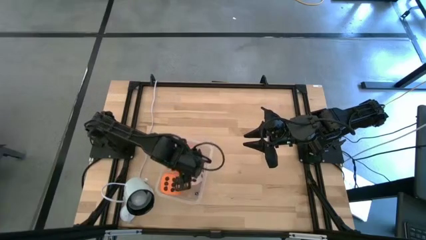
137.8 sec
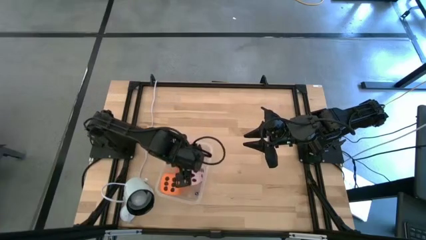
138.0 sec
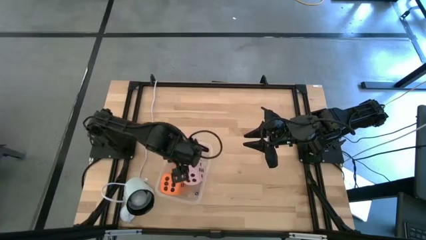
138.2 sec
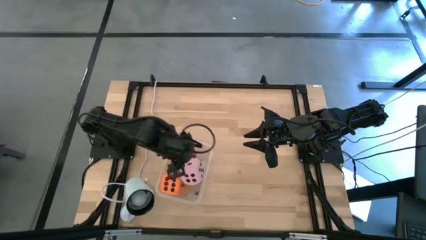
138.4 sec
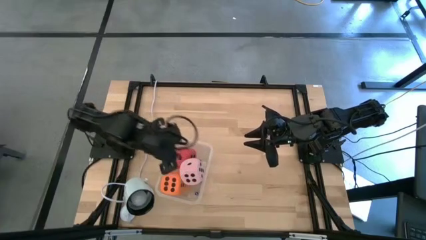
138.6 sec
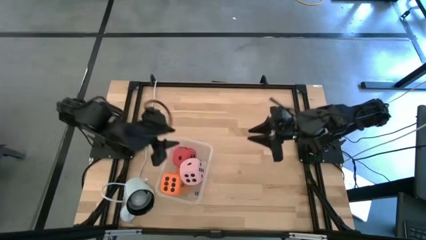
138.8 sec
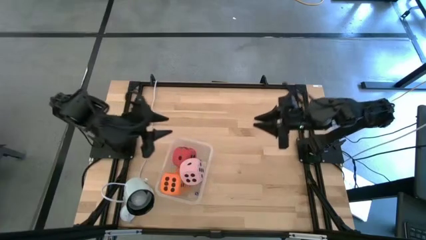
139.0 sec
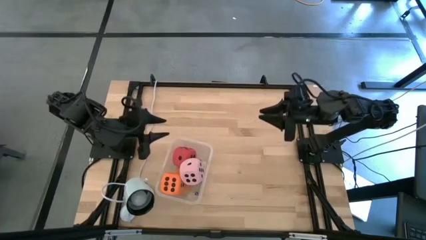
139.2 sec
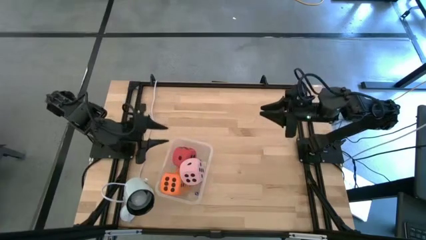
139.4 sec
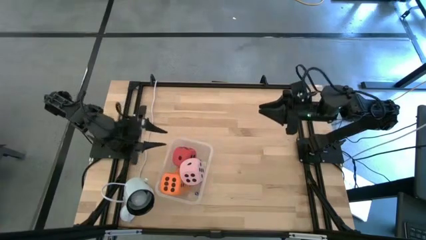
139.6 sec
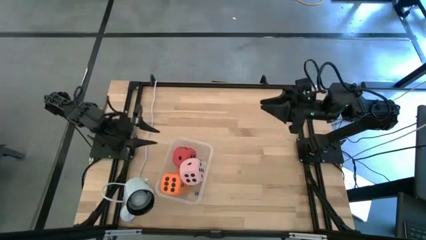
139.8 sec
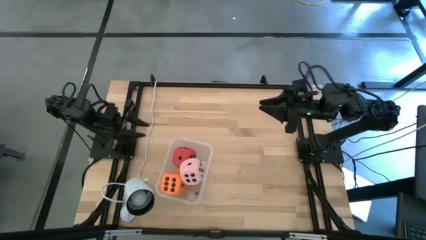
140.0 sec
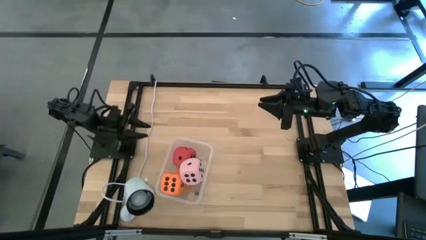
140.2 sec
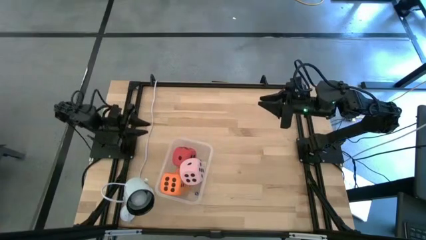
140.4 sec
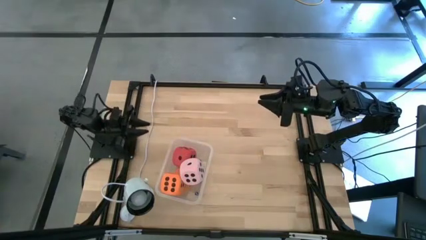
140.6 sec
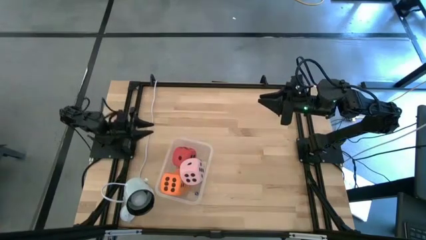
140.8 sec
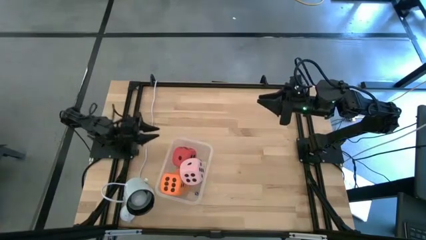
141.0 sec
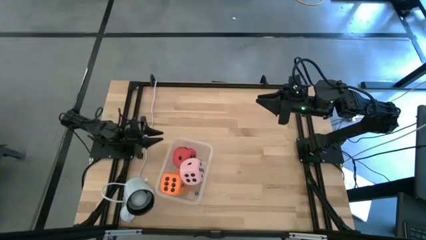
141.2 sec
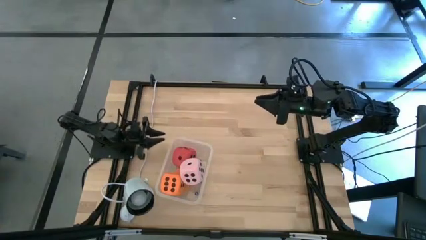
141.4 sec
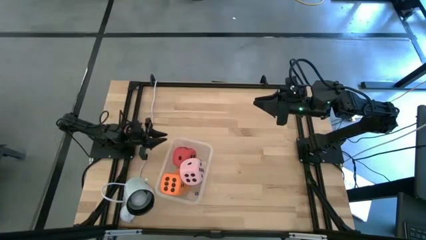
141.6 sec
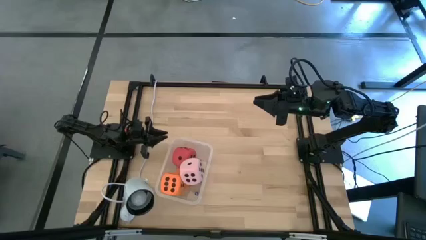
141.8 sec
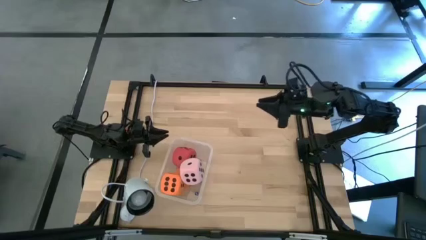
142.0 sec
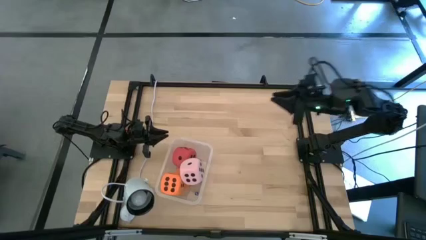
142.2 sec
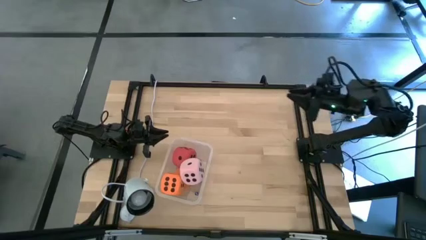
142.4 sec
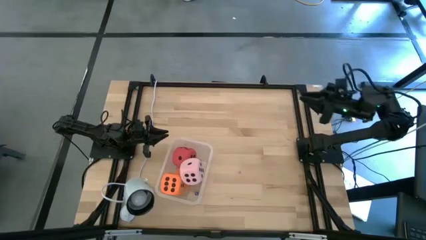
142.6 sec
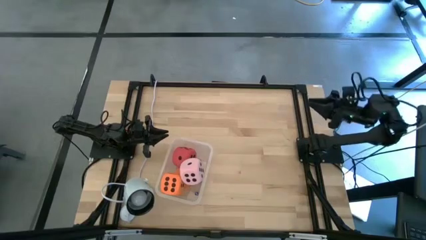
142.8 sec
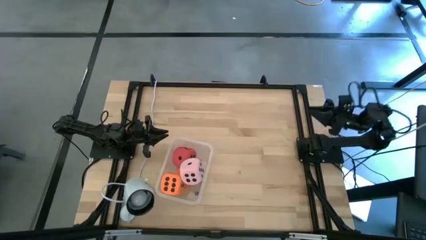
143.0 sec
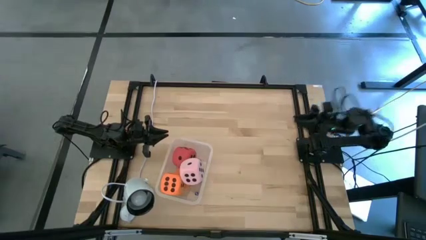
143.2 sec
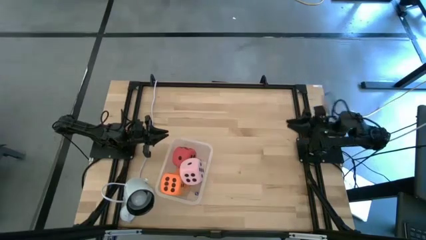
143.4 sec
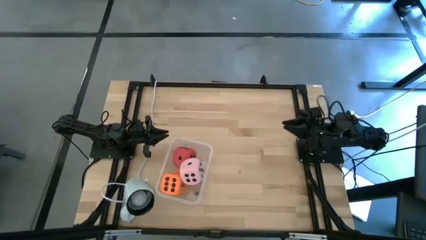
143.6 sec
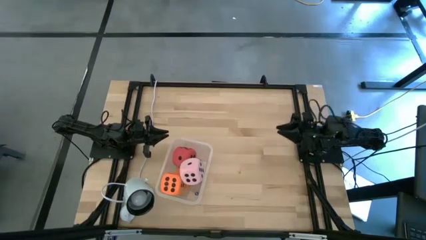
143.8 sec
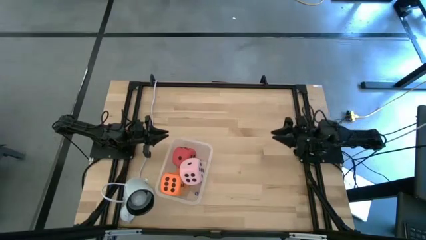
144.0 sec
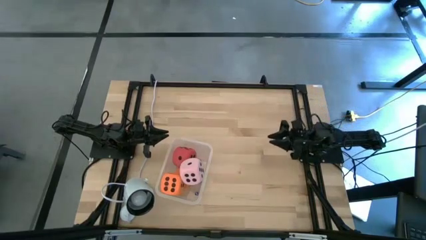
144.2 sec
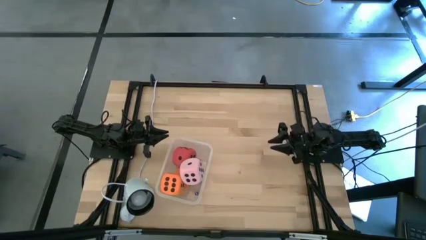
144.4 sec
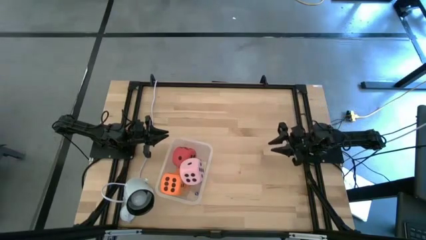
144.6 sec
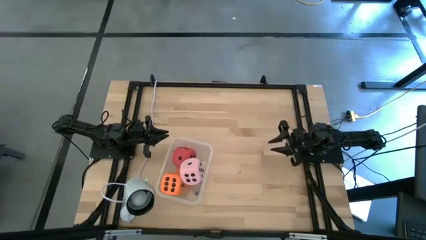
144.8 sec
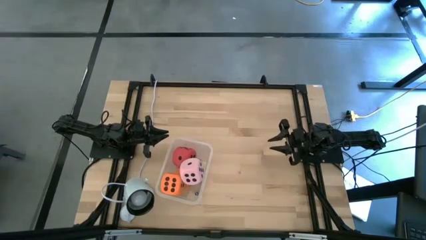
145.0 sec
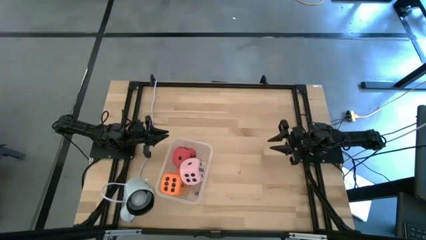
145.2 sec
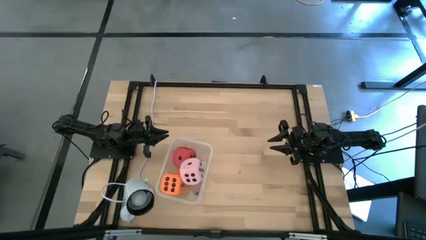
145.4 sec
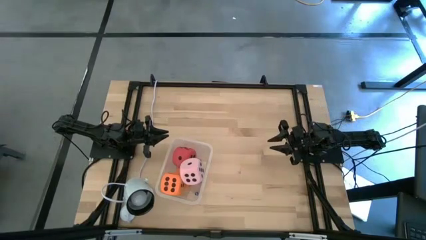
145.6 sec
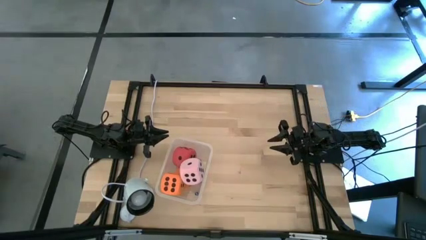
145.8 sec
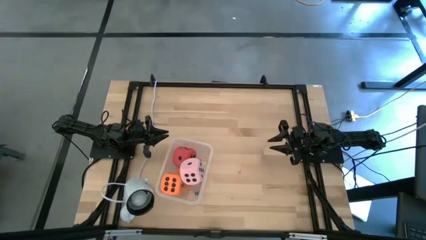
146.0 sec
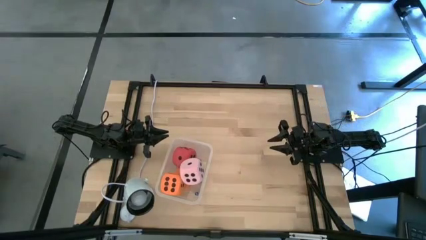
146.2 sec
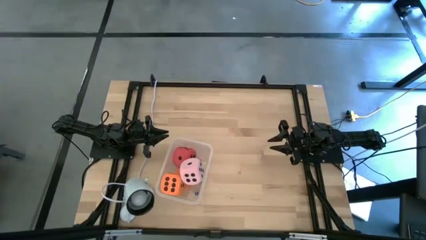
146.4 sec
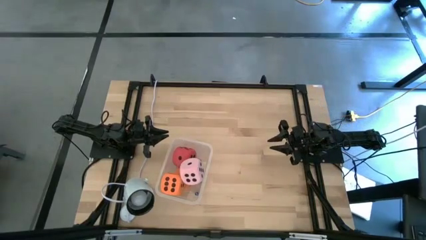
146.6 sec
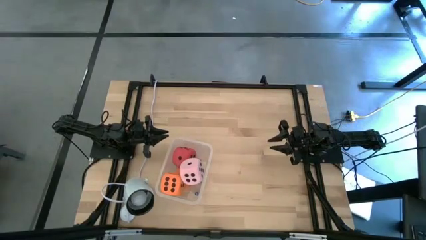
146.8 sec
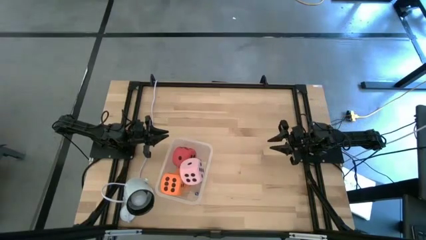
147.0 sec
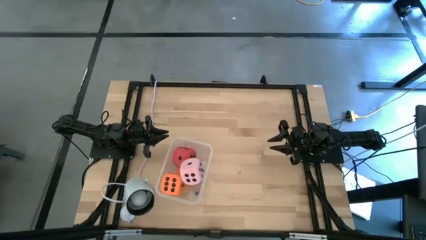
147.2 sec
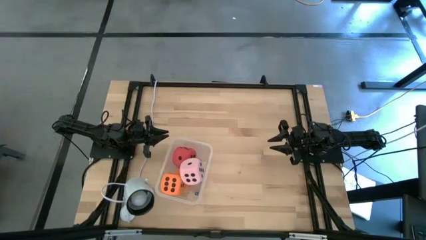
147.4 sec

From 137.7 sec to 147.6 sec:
Task: Pick & Place Dice
Return to Home Position

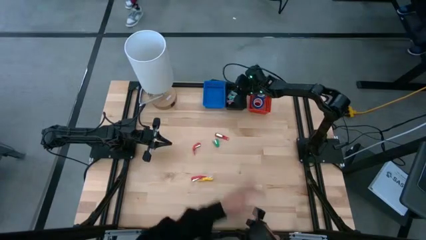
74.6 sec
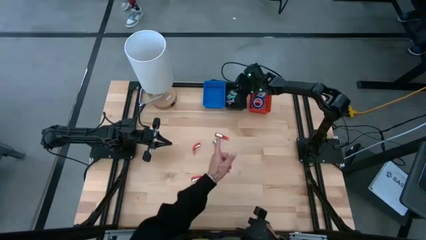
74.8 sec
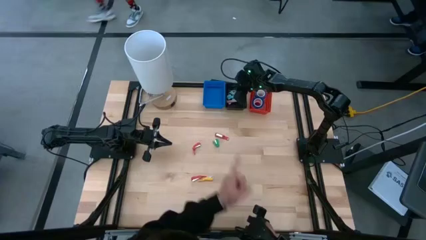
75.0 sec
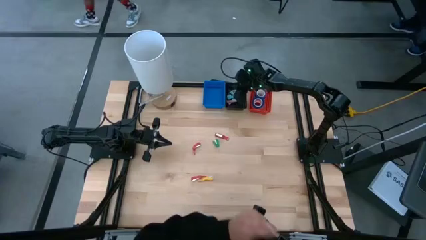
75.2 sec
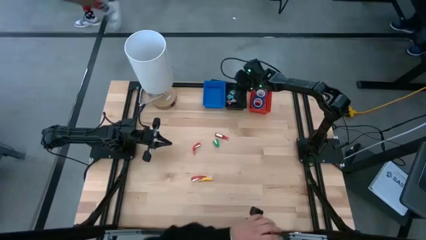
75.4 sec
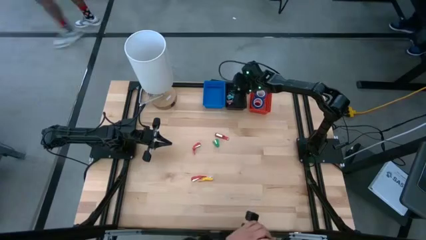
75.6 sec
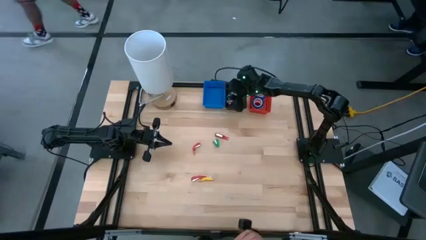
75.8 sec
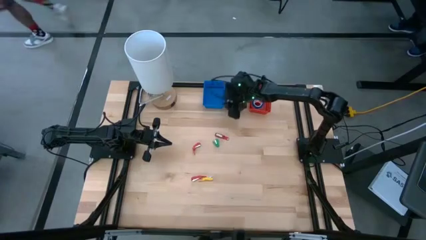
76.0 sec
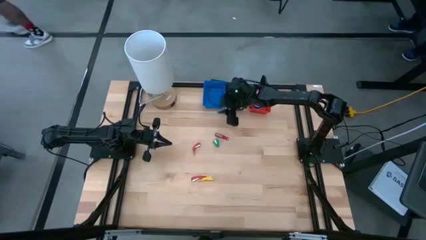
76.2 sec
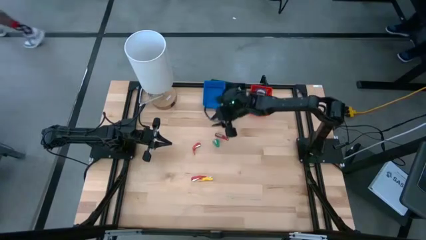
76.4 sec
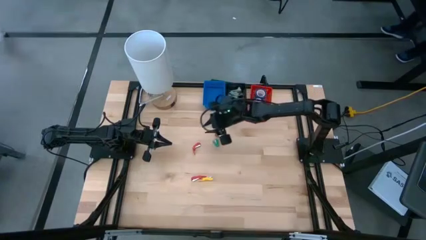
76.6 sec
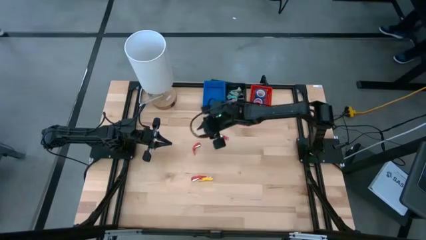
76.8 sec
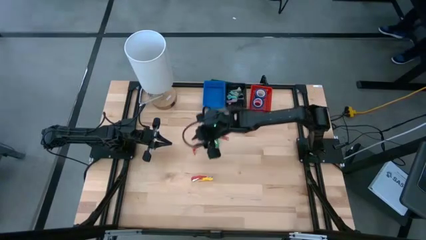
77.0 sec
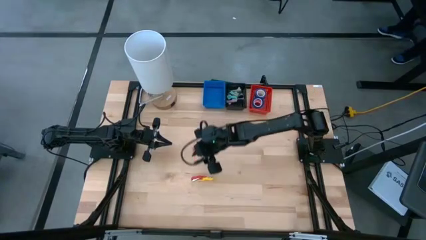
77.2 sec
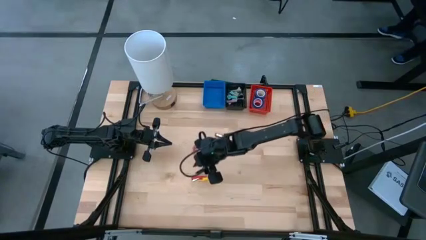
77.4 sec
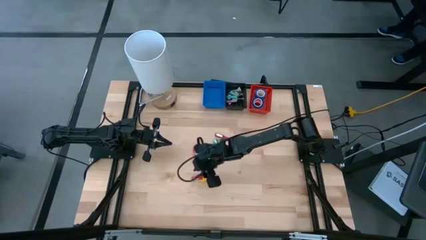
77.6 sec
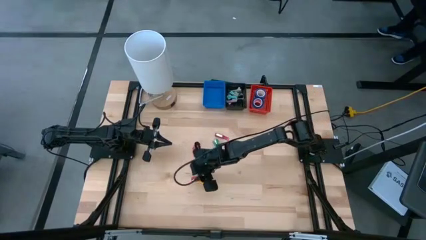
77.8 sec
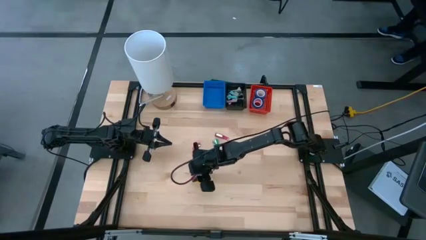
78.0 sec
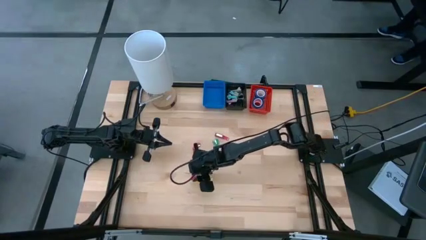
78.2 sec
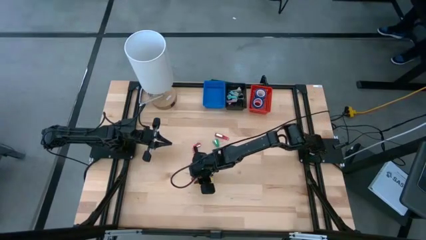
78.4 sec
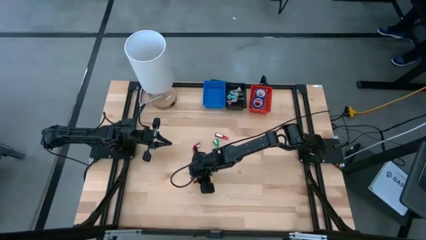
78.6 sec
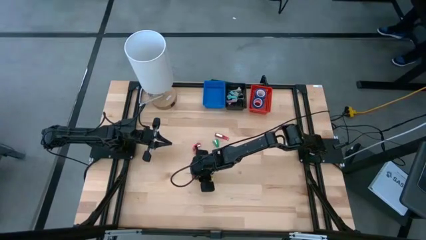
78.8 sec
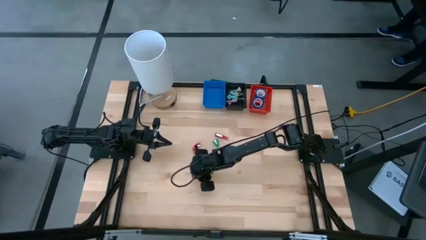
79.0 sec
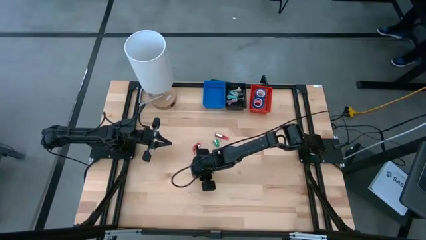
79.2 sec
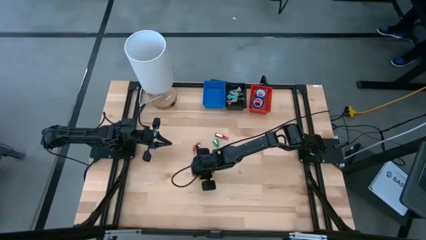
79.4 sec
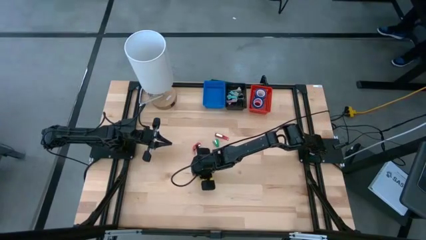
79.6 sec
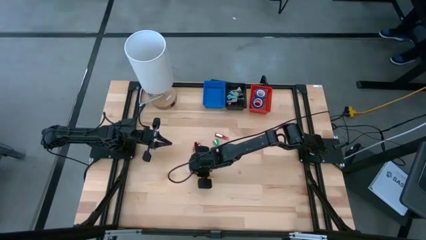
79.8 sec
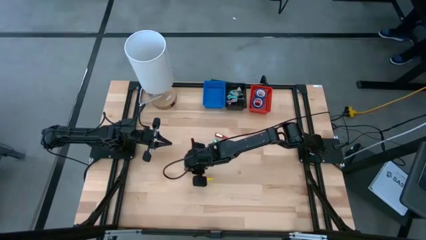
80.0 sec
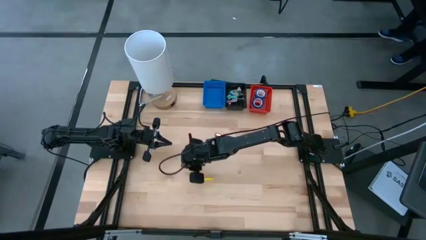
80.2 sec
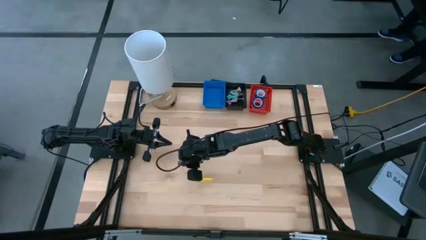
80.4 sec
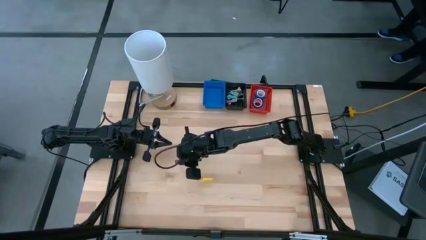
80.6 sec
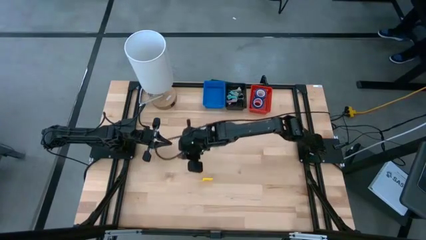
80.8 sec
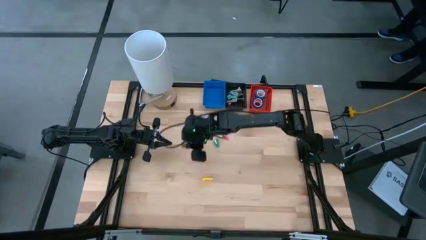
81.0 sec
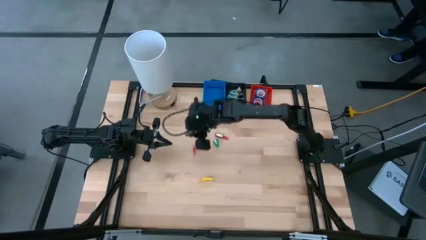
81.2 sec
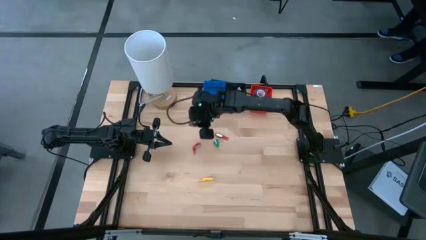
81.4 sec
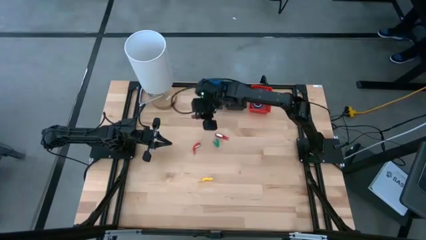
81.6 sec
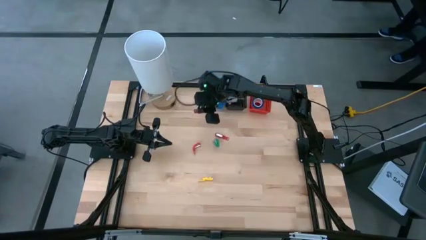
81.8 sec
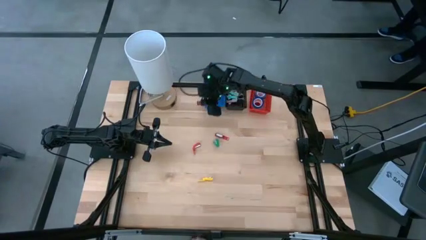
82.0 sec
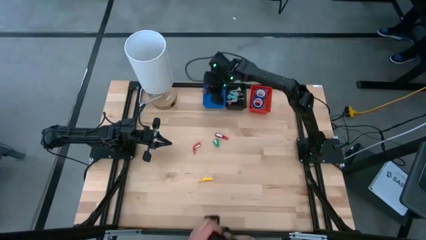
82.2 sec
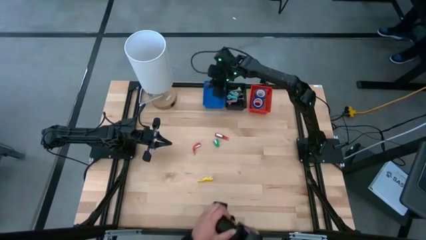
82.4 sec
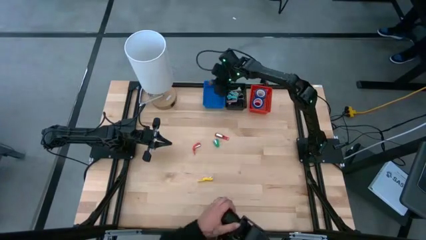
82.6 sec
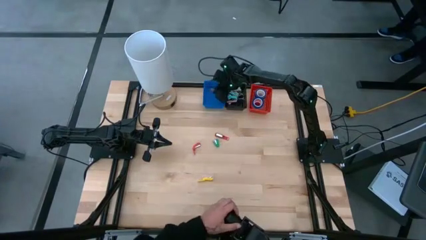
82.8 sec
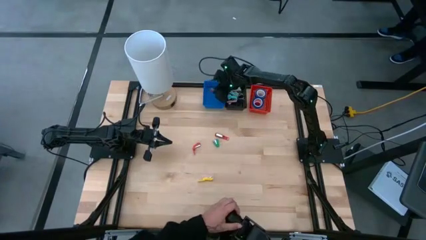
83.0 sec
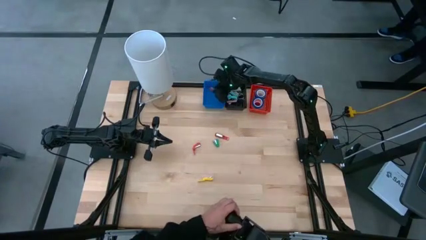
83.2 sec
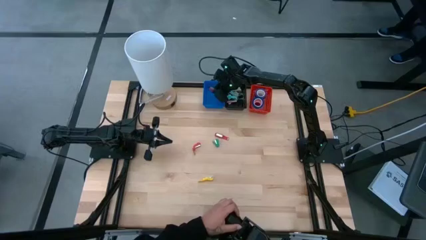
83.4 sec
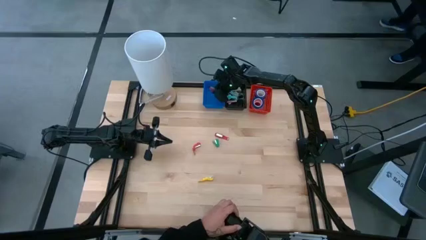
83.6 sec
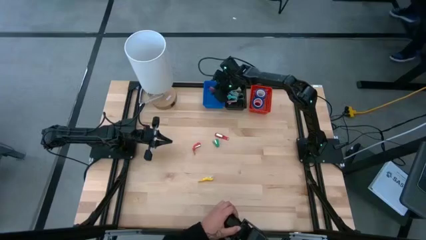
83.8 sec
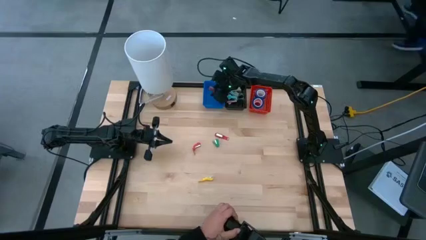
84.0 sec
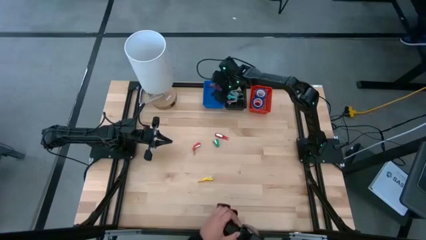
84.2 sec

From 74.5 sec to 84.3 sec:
Task: Pick and place Stapler, Stapler remover, tape
Put the bottom left red stapler into the blue bin
